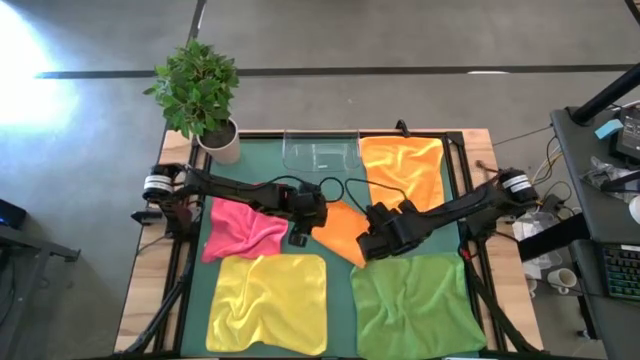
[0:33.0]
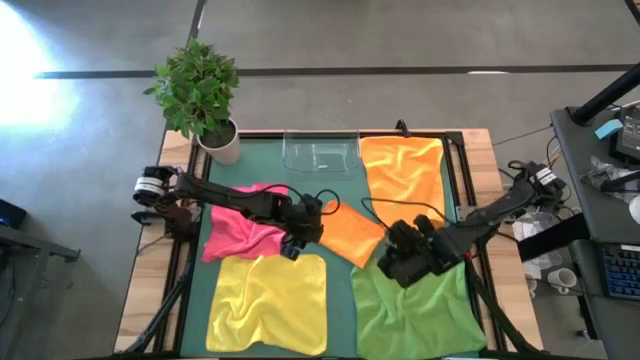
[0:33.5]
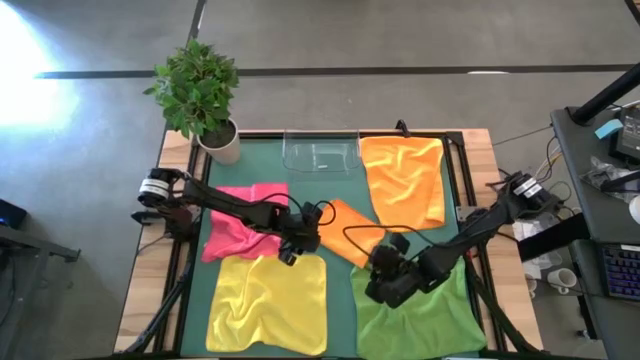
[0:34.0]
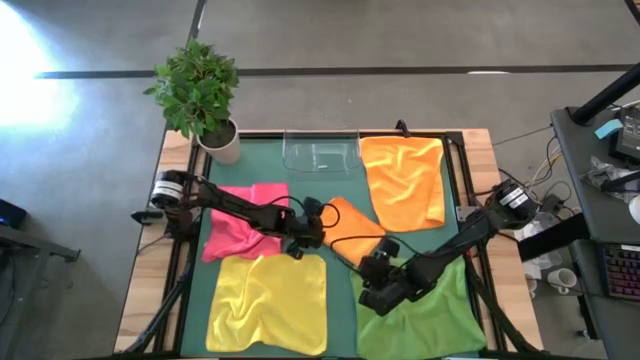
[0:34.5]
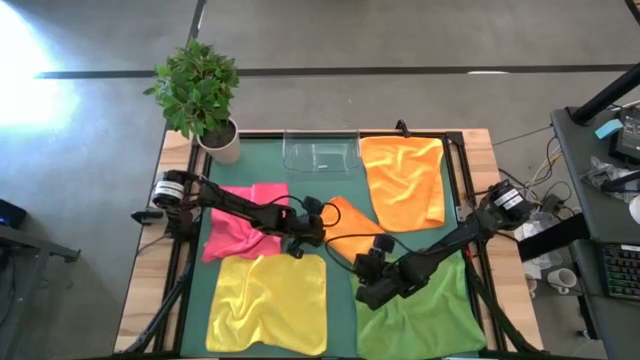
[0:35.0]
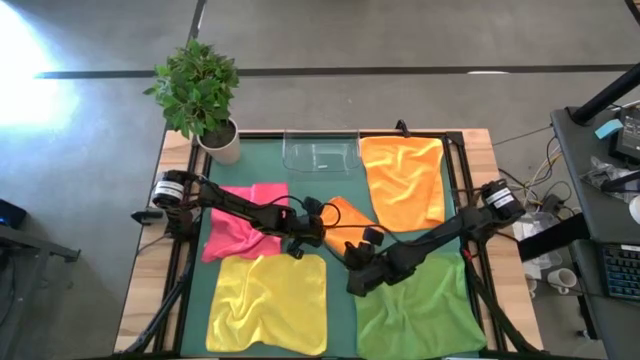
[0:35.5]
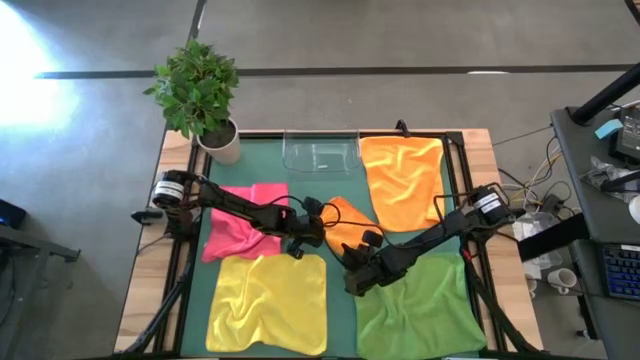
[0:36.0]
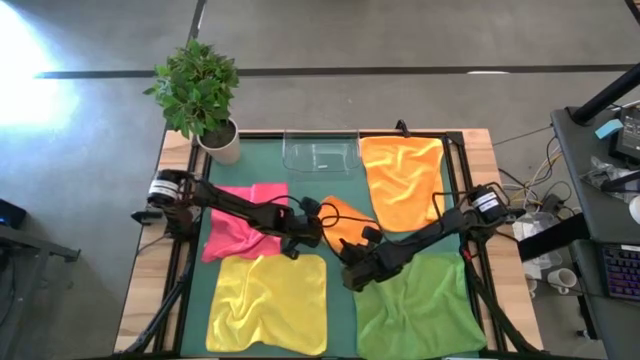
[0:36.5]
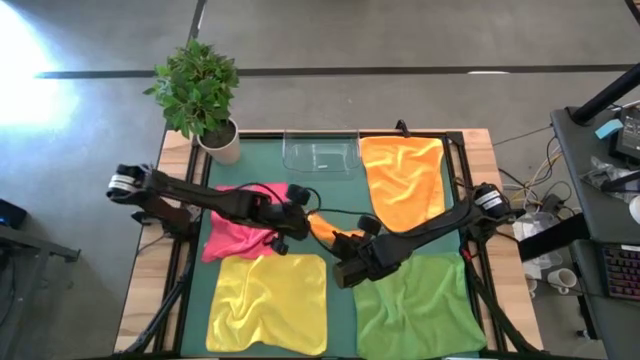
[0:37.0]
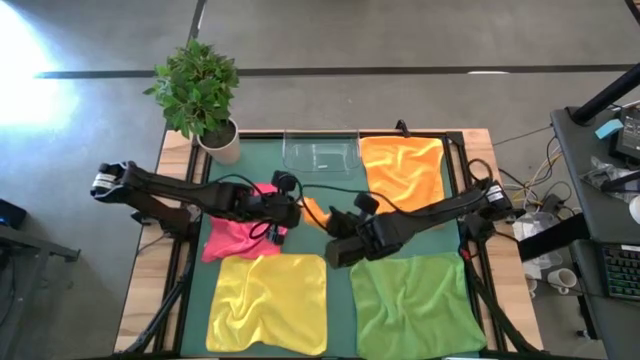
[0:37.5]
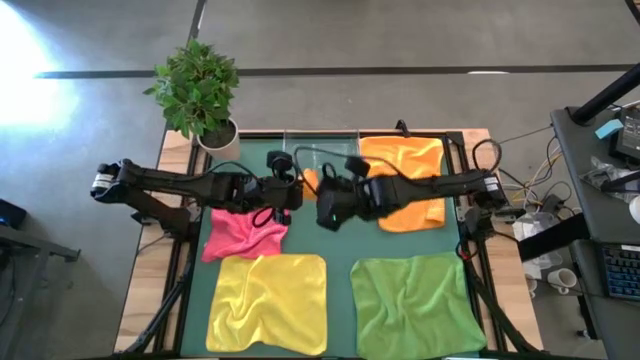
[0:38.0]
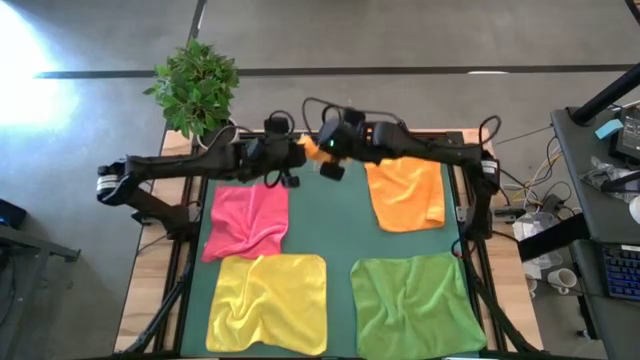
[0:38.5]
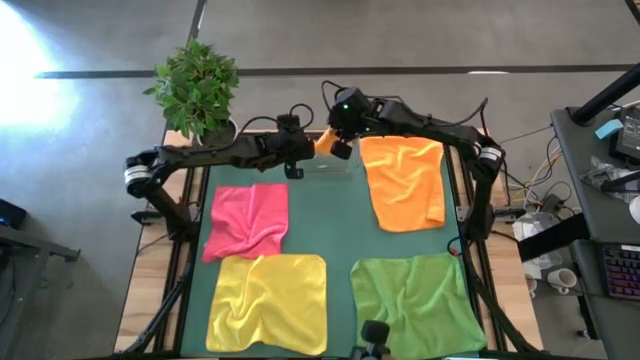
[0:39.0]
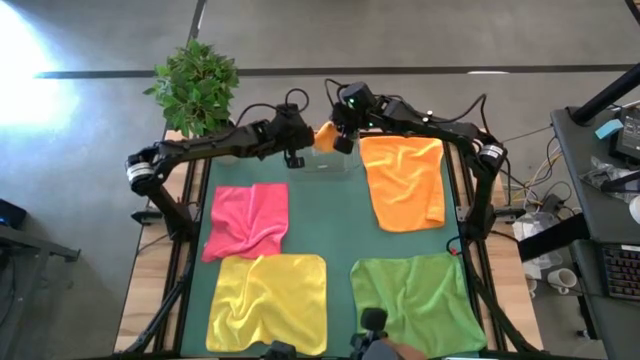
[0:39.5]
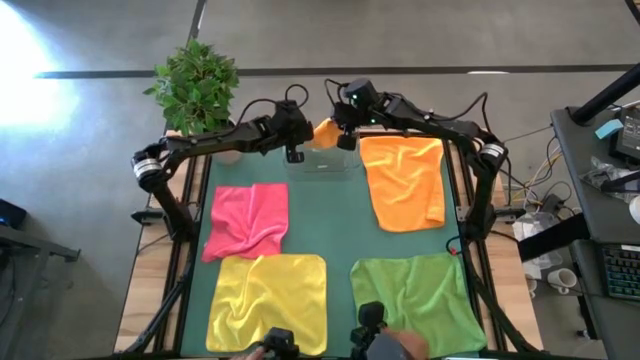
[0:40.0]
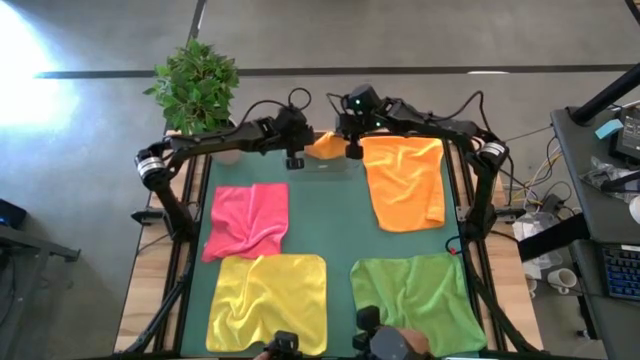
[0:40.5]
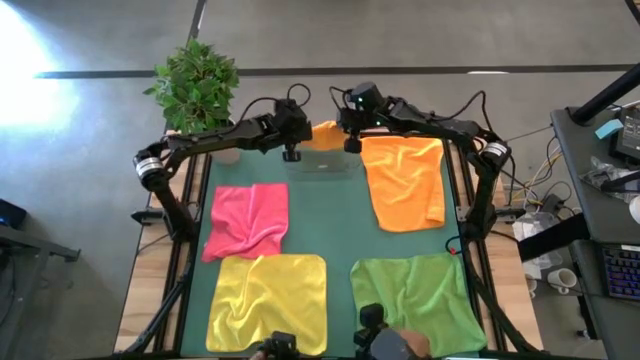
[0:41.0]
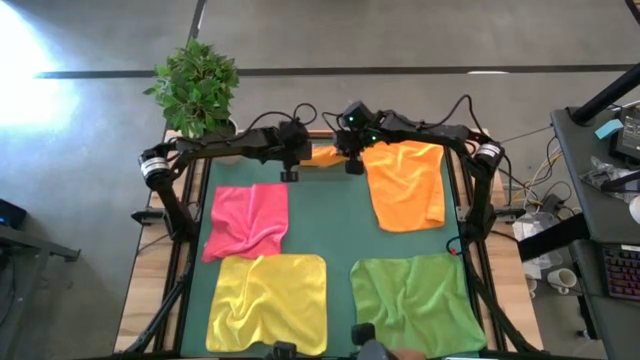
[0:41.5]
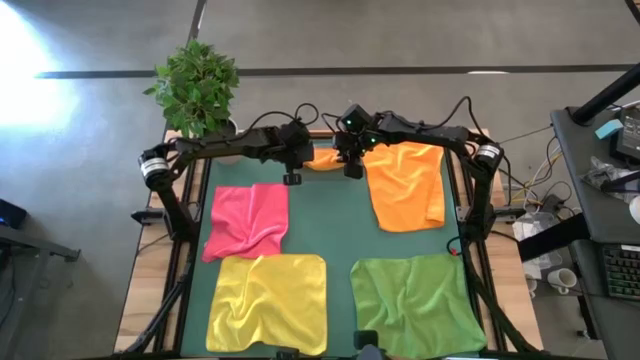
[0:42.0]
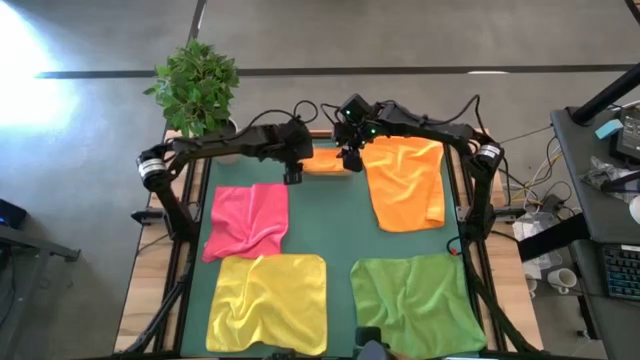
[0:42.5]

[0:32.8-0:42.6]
Task: Fold microfiber towels
Put the left orange microfiber cloth into the bin

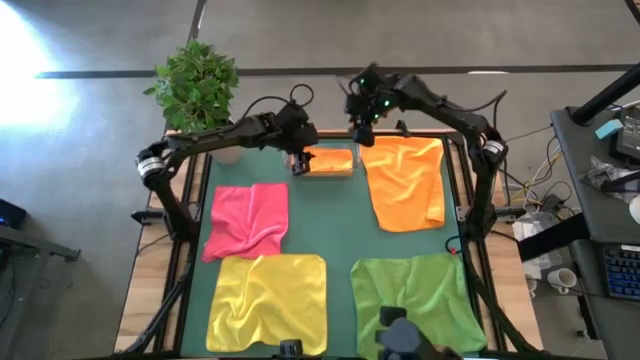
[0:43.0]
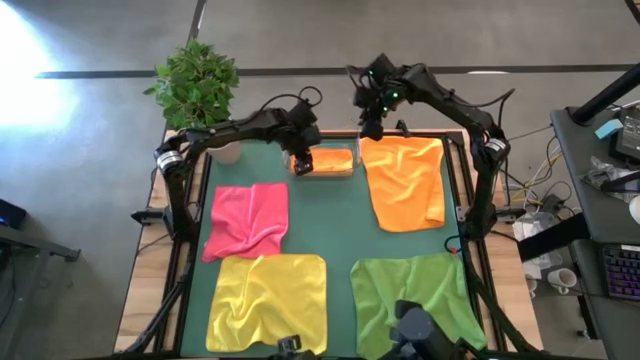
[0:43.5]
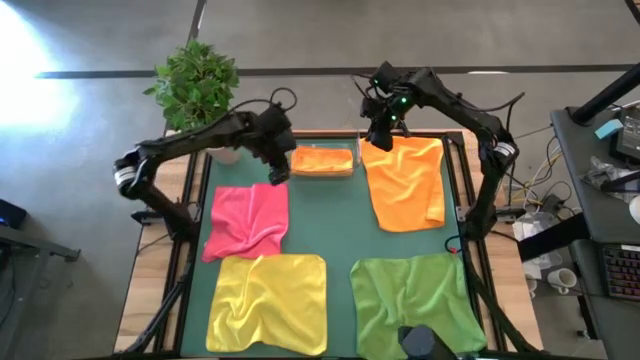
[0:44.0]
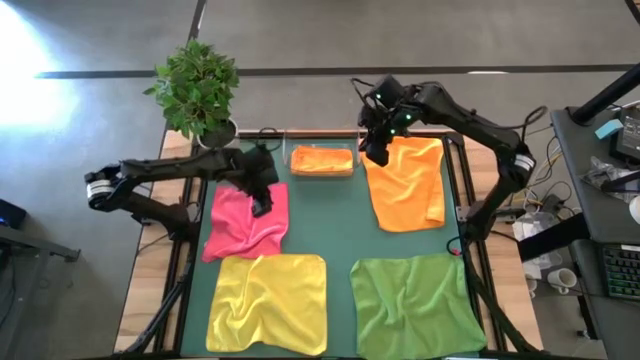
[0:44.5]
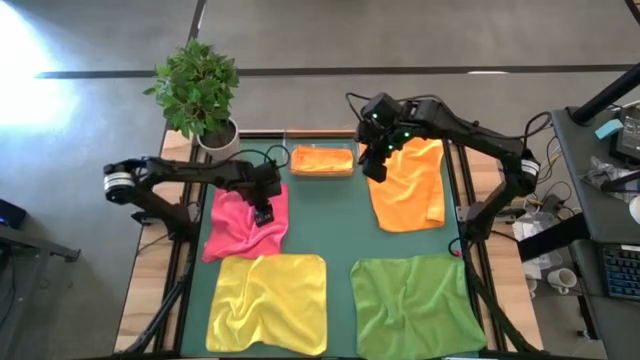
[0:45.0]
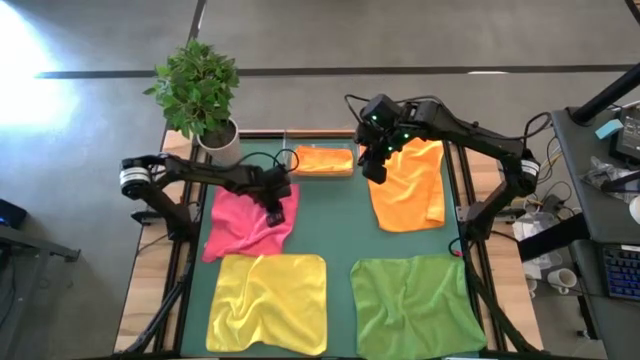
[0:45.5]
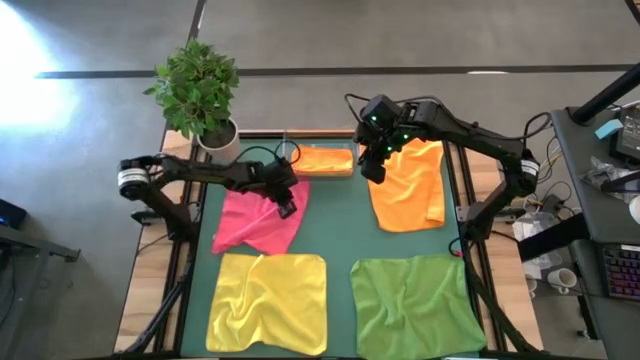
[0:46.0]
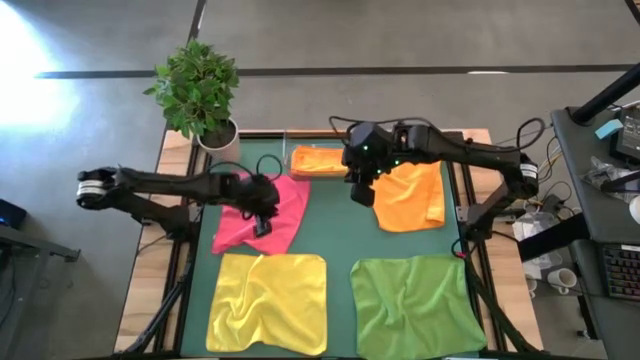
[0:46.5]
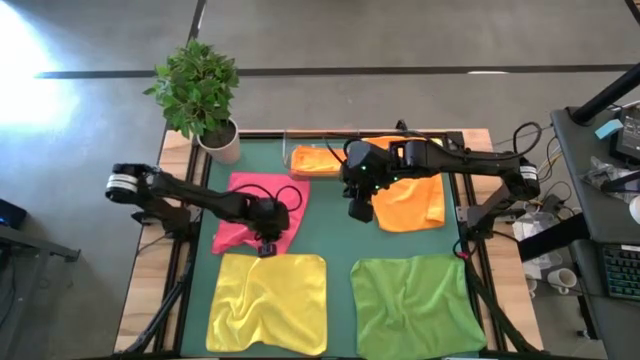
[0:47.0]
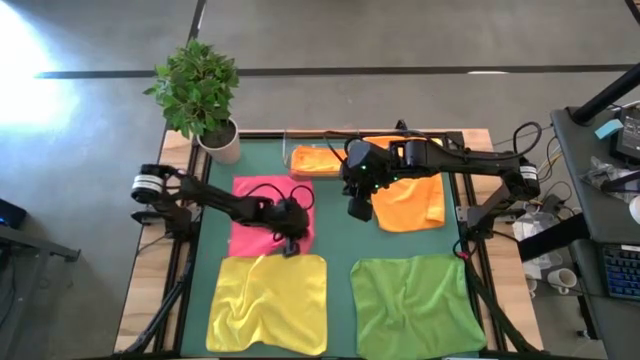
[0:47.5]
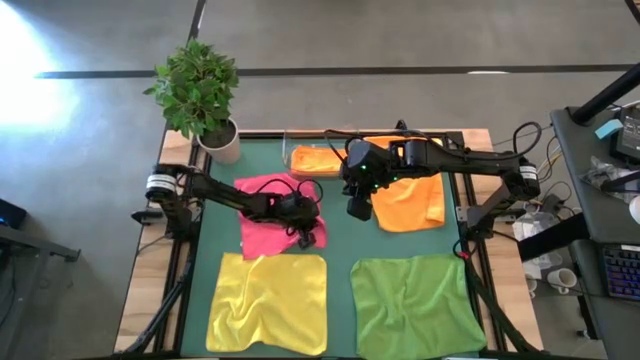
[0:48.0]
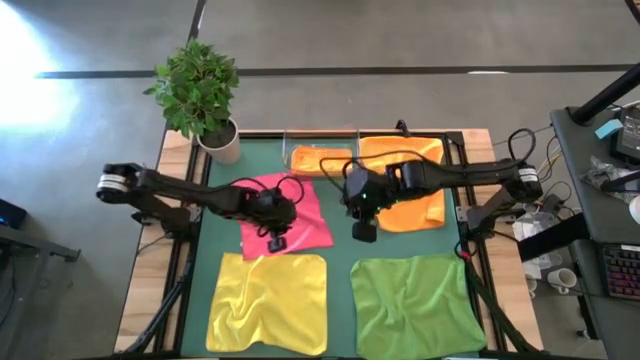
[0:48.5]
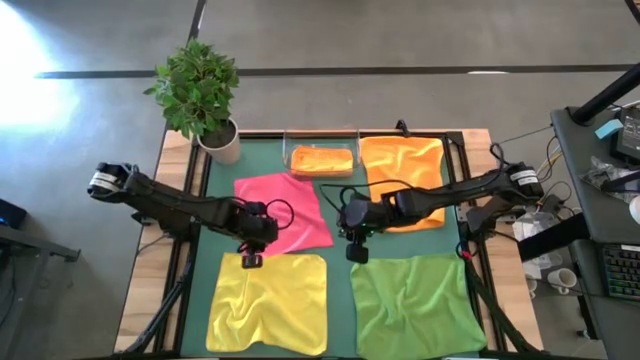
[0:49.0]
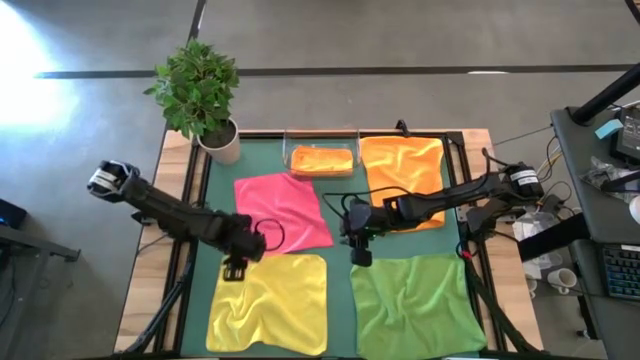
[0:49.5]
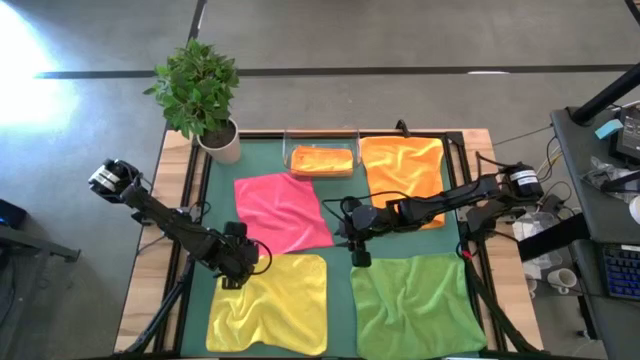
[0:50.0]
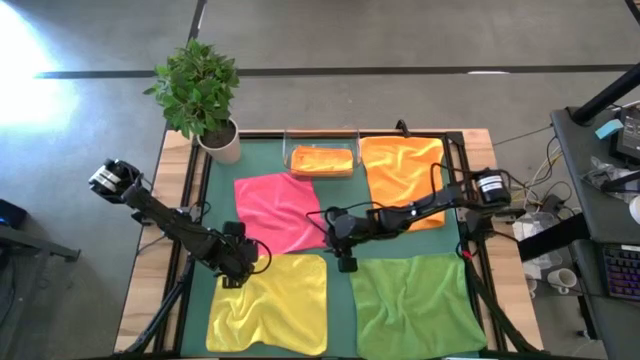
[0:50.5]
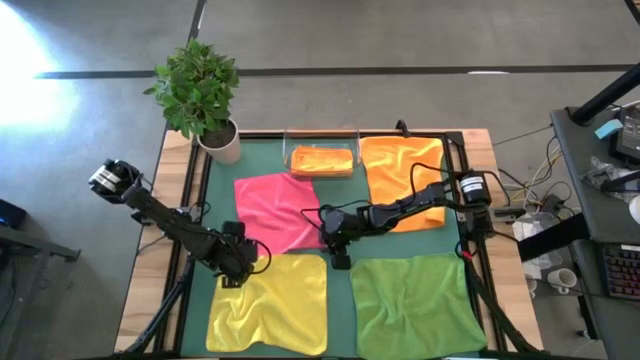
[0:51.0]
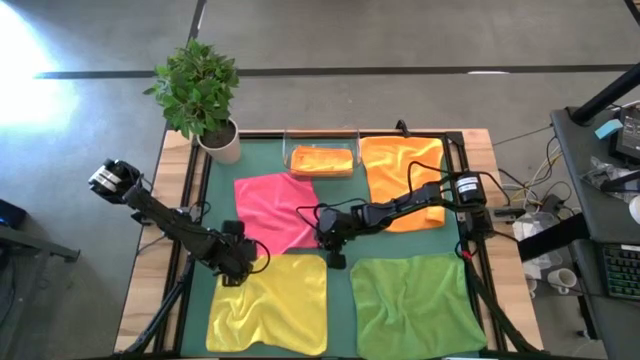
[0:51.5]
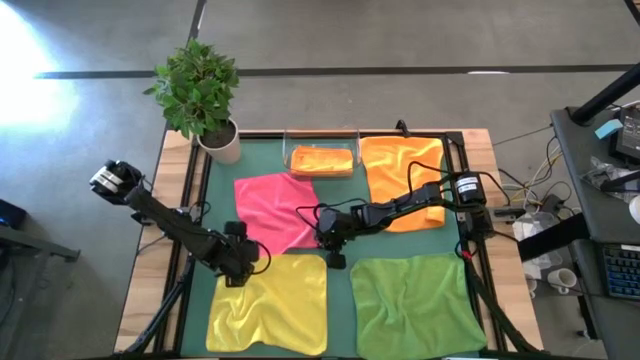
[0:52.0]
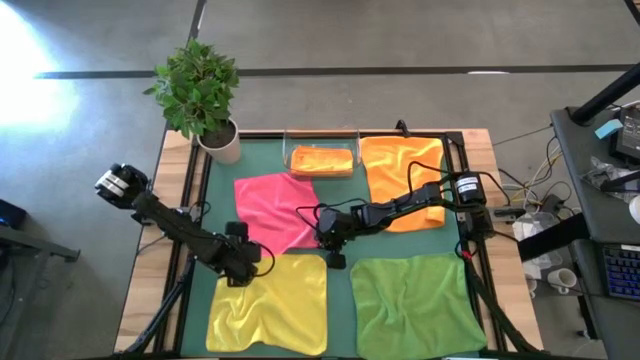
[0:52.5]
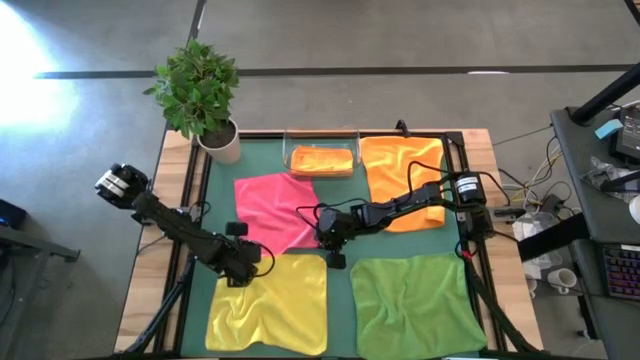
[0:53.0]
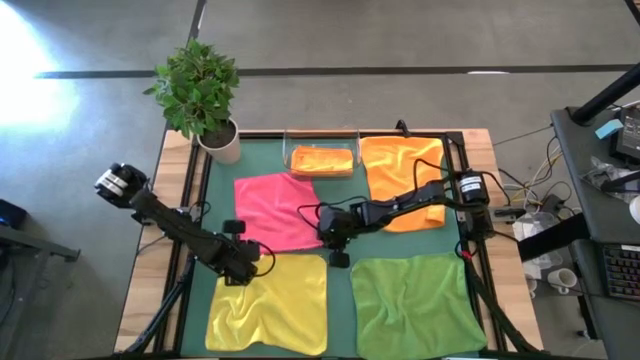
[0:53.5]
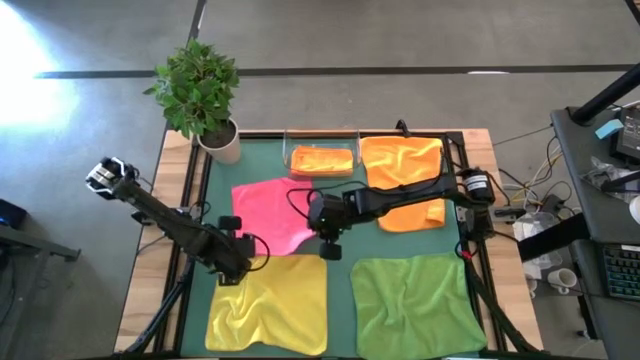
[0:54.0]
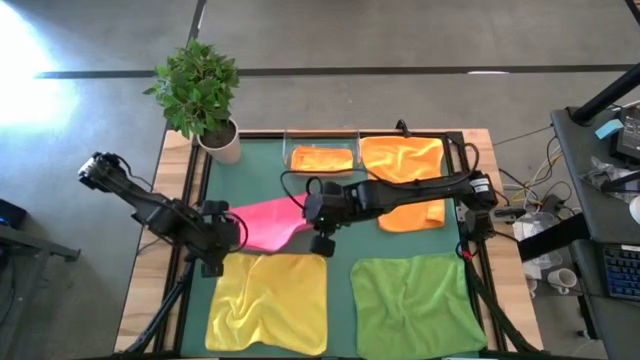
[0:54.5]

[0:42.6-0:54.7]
Fold the pink microfiber cloth
